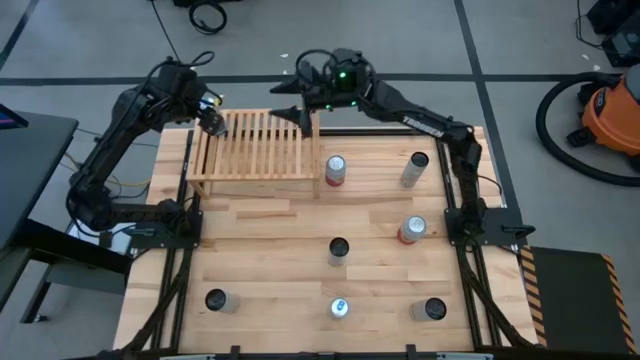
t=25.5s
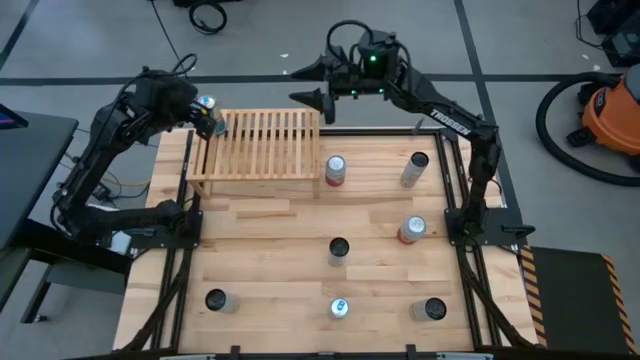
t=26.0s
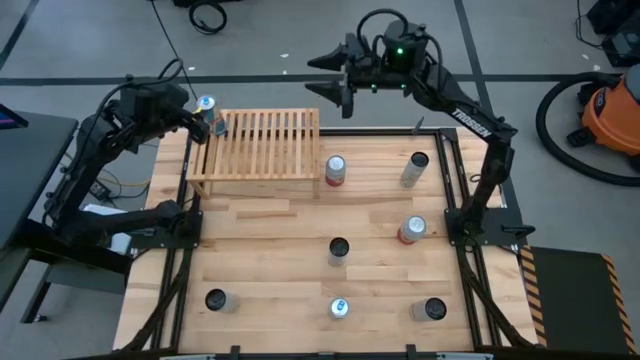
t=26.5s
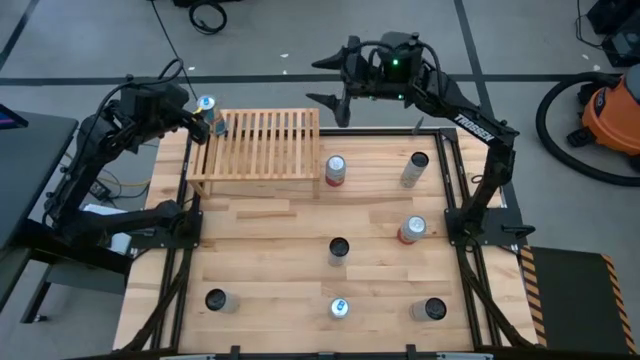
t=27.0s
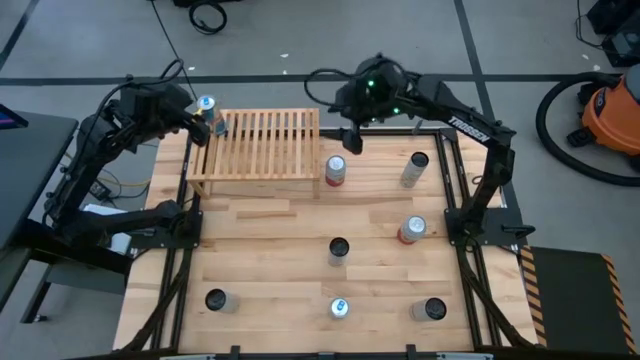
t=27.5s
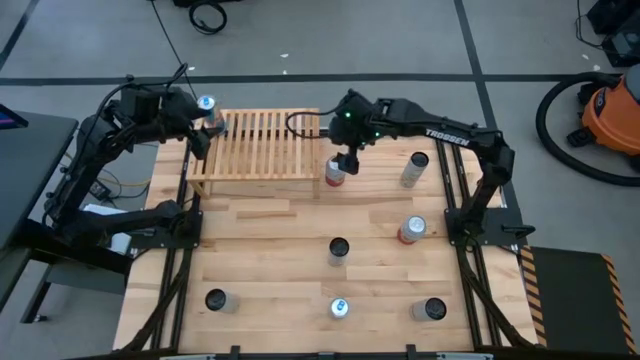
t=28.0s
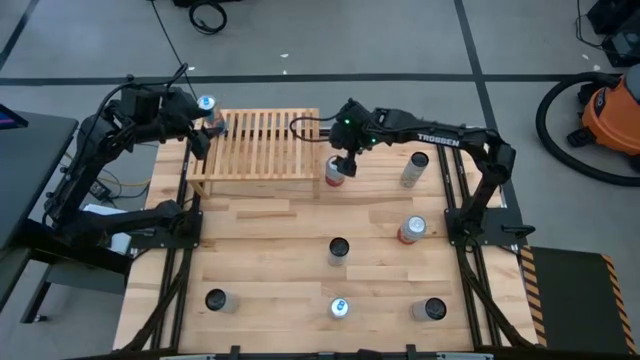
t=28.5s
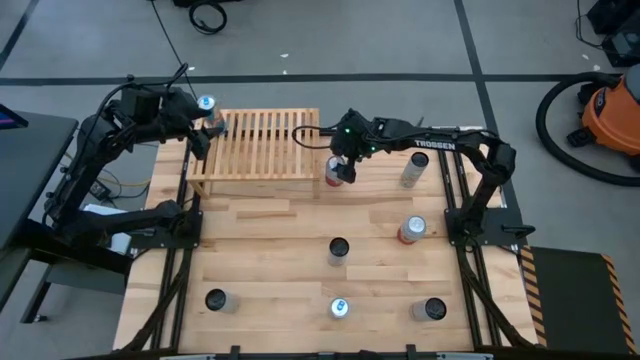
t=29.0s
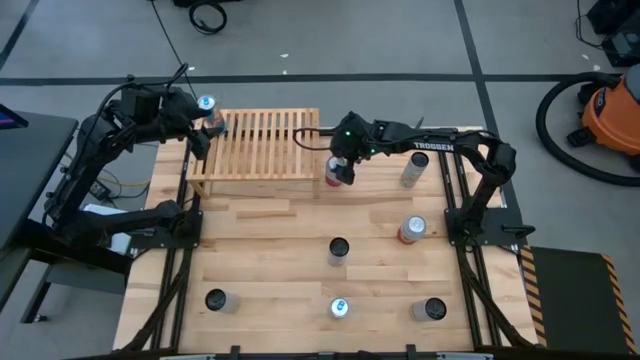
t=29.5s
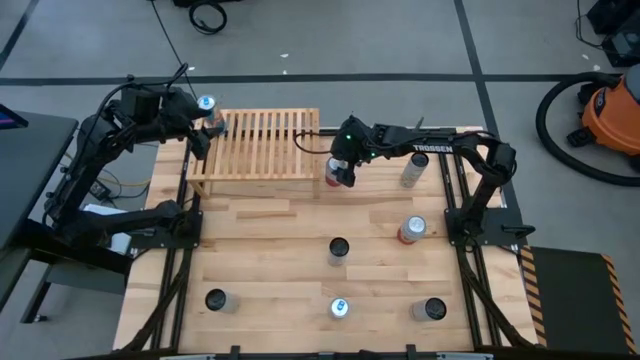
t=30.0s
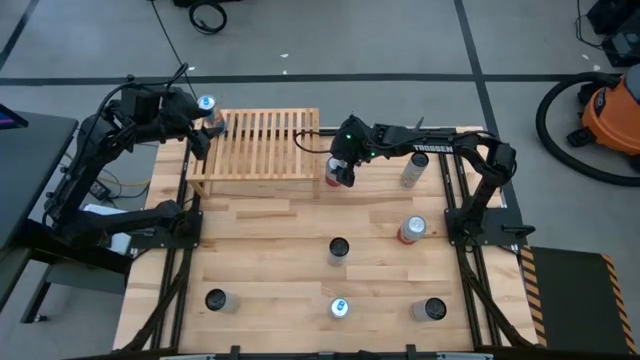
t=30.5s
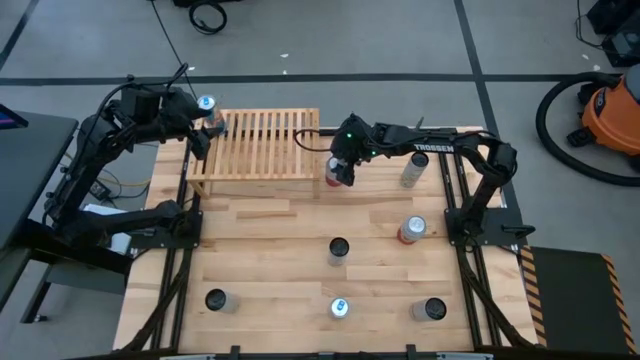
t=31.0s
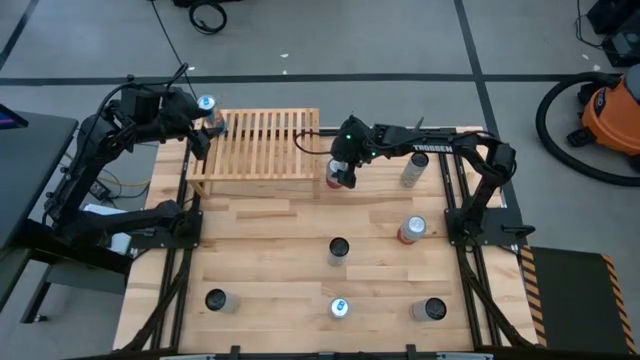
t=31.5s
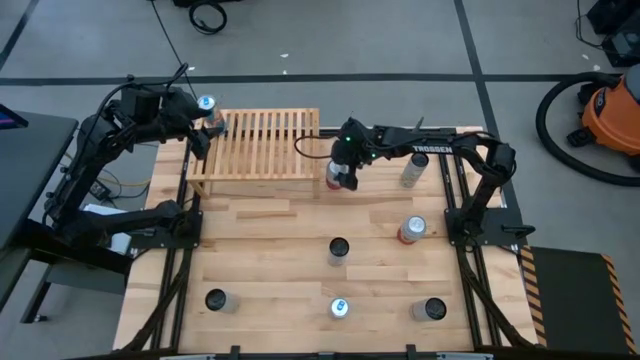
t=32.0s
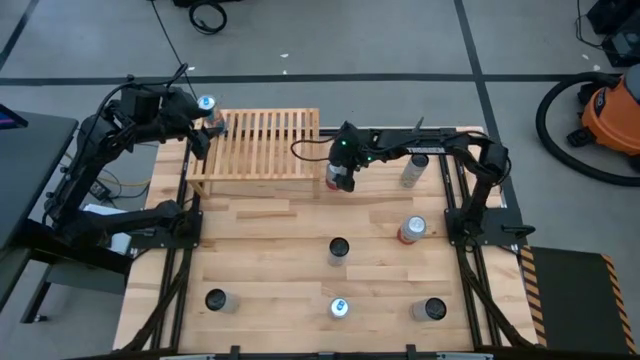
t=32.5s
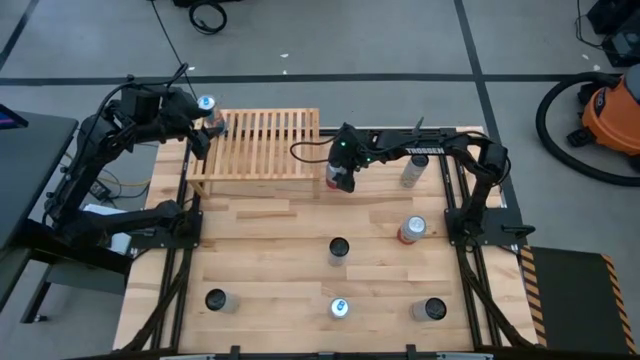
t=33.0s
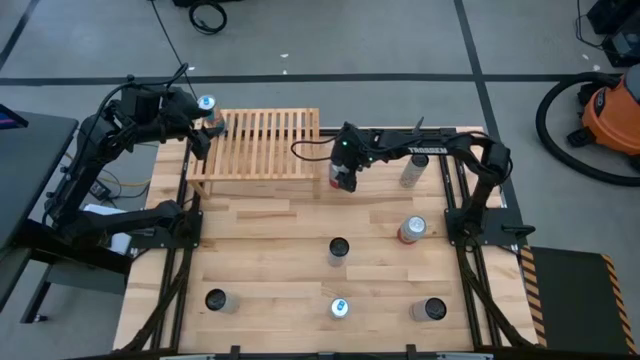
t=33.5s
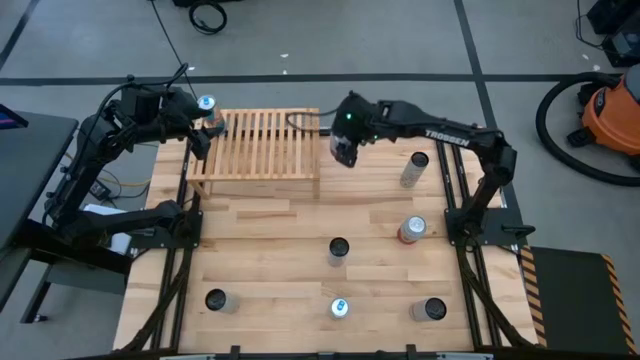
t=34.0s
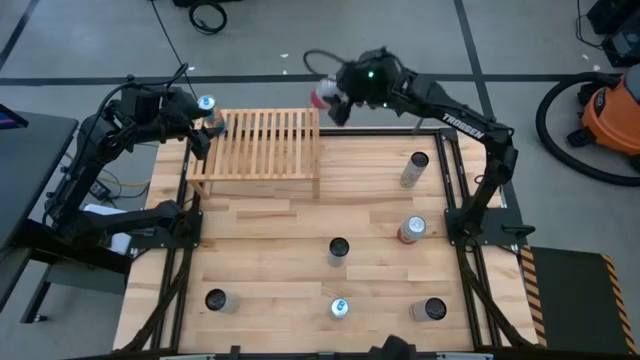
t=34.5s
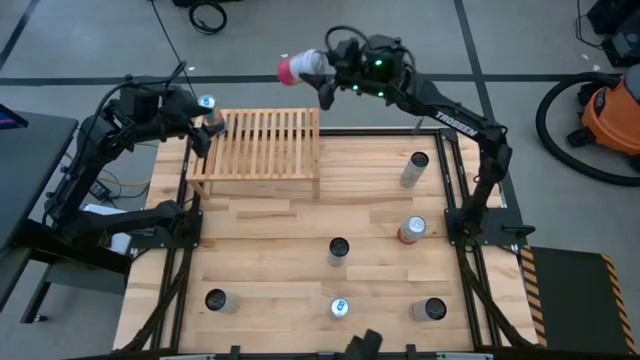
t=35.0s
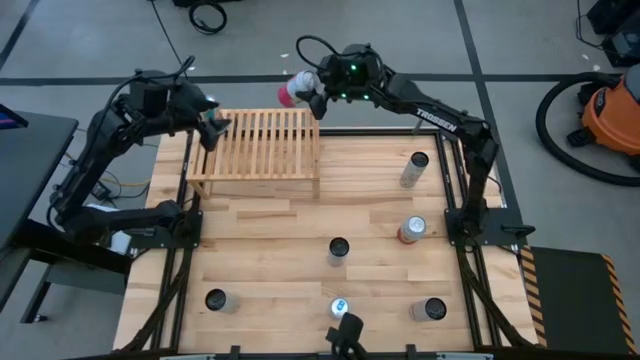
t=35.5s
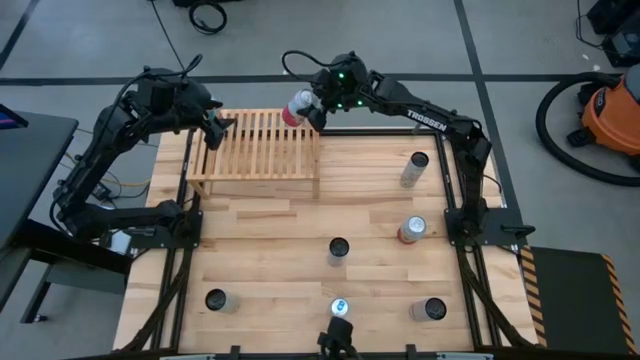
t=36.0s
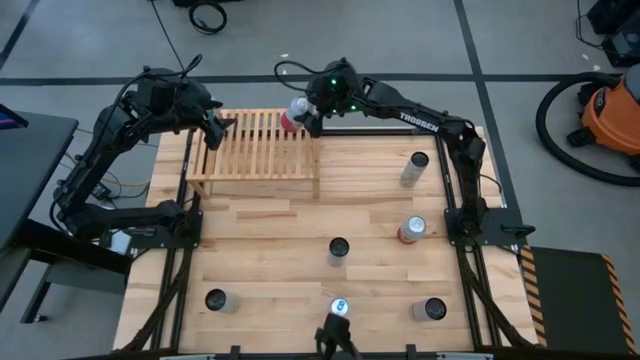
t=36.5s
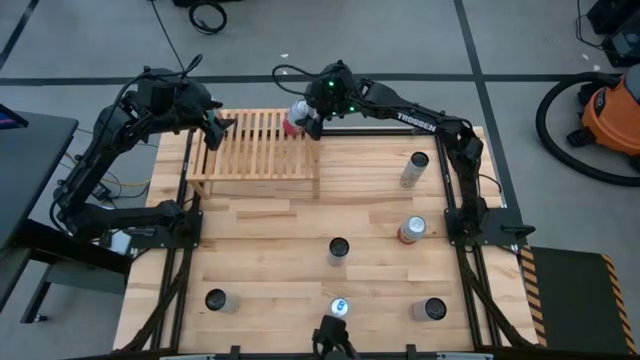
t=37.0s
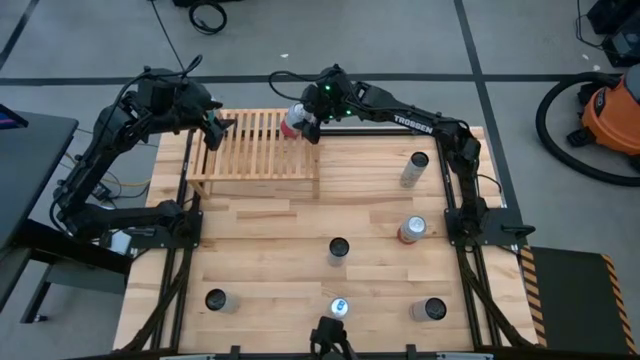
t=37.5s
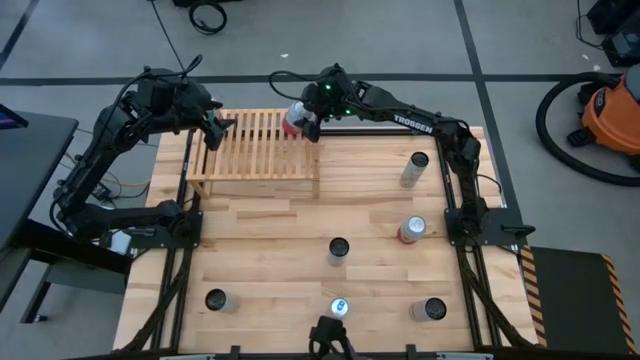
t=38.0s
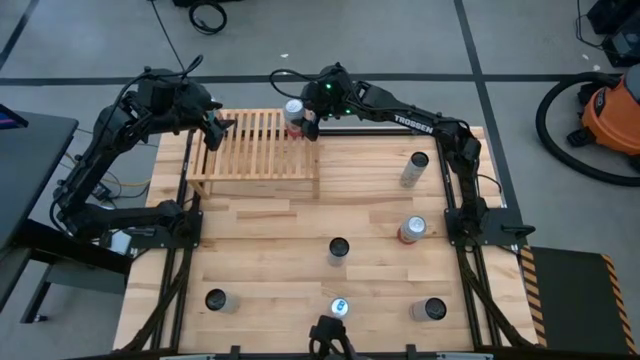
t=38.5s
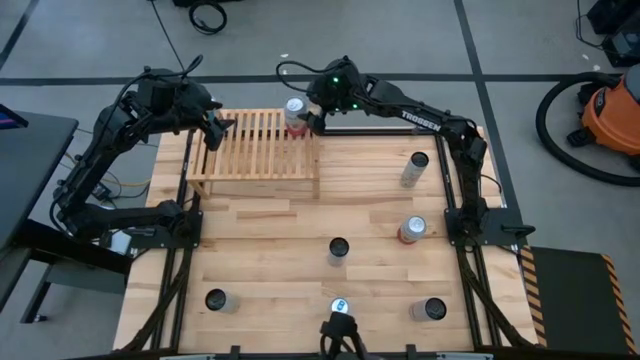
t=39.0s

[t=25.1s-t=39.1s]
Task: Place canned beverage on shelf
Put the left pink and white soda can on the shelf aligned with the blue soda can

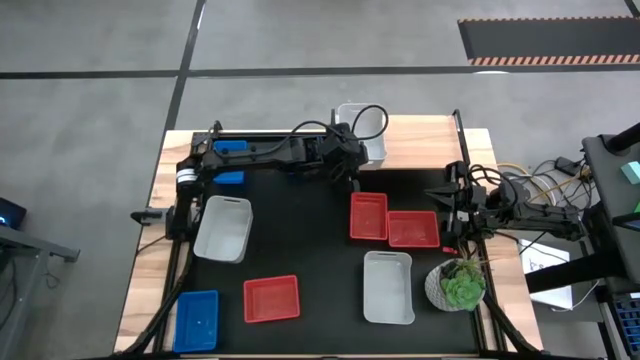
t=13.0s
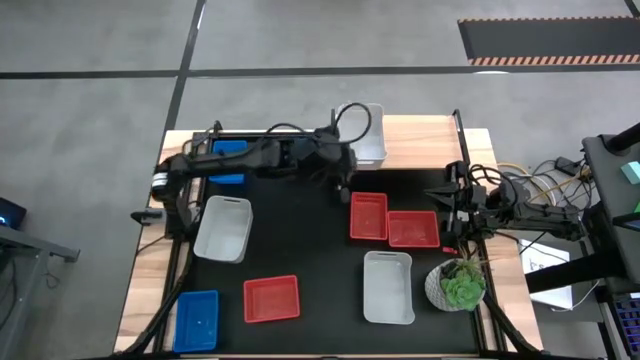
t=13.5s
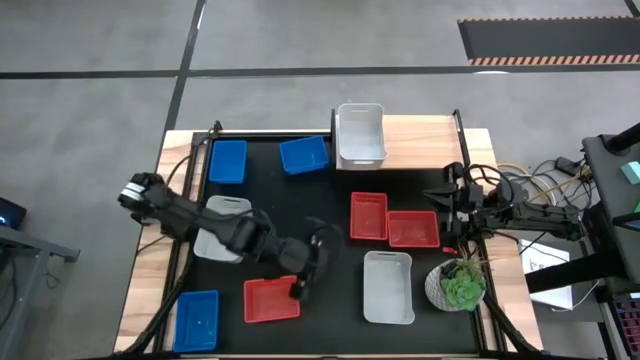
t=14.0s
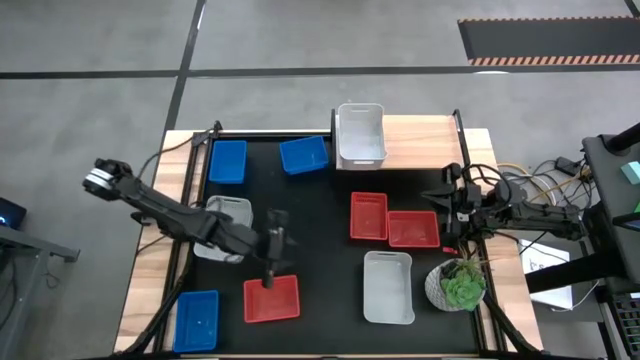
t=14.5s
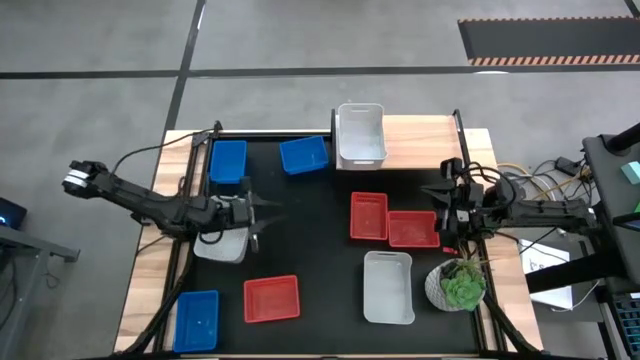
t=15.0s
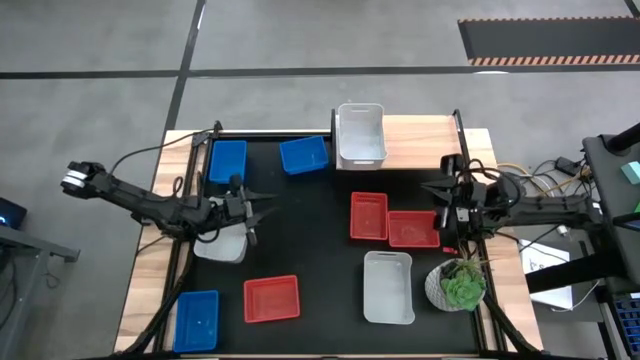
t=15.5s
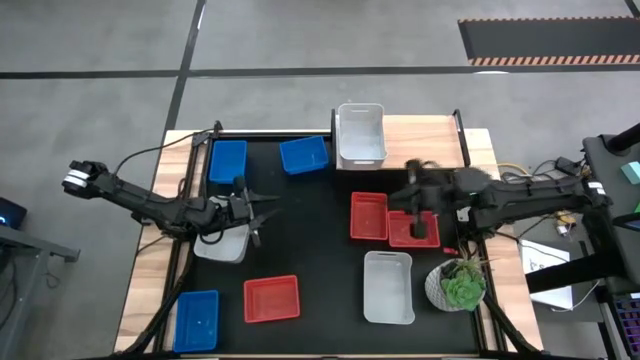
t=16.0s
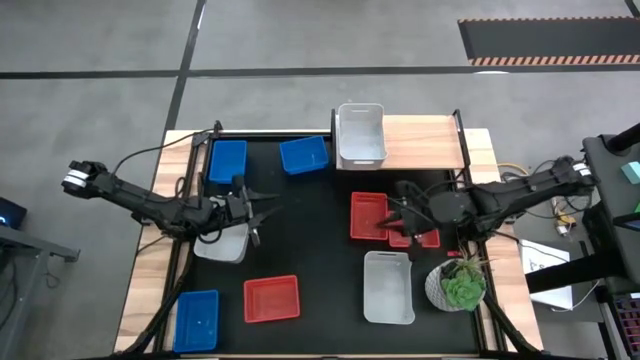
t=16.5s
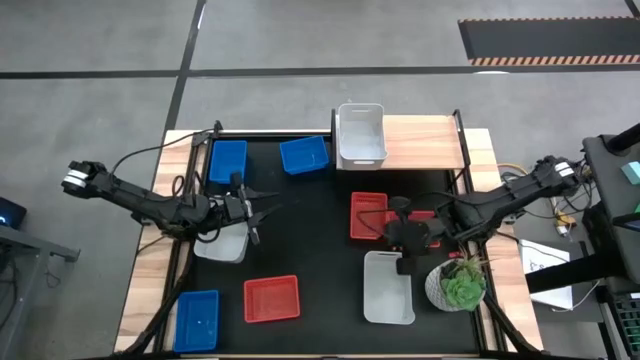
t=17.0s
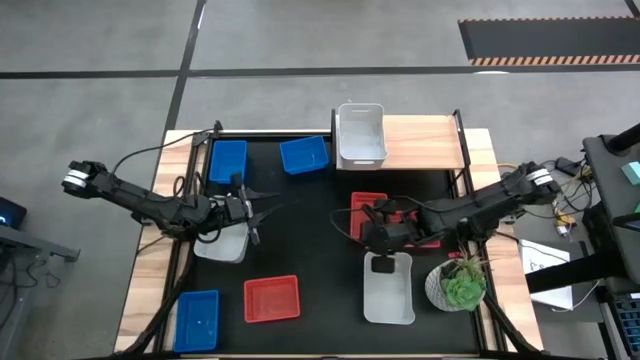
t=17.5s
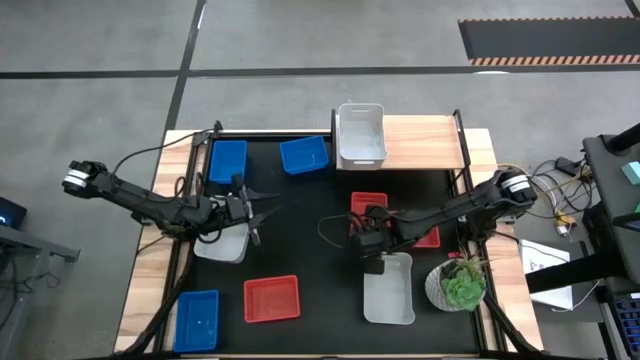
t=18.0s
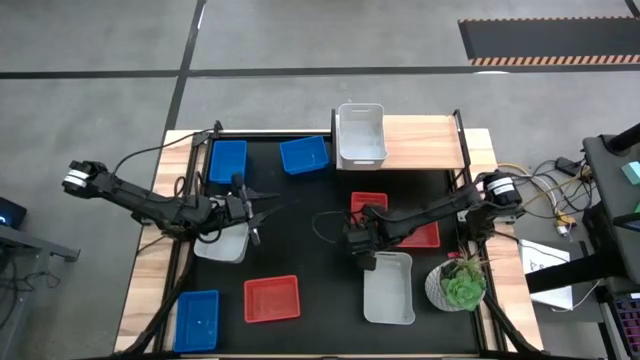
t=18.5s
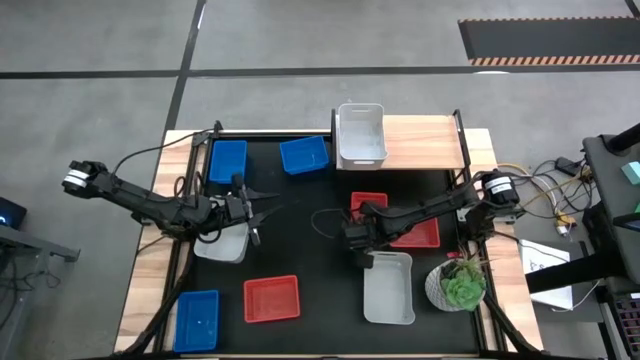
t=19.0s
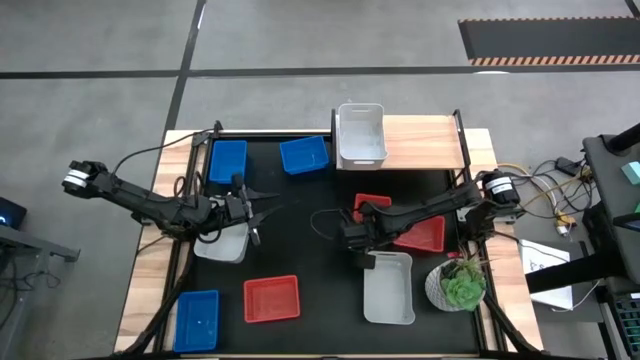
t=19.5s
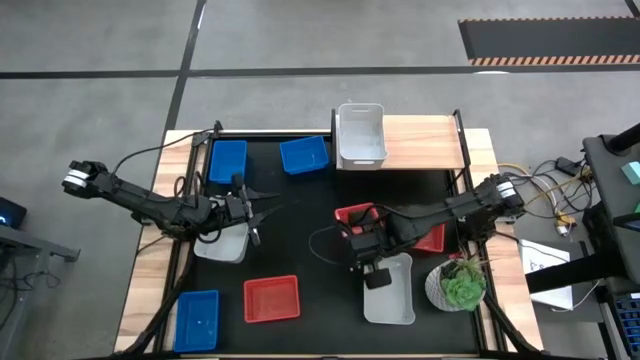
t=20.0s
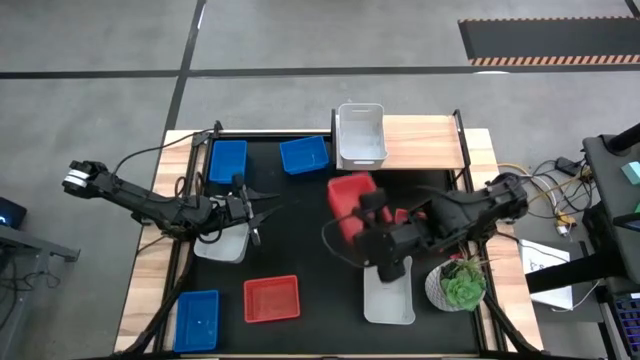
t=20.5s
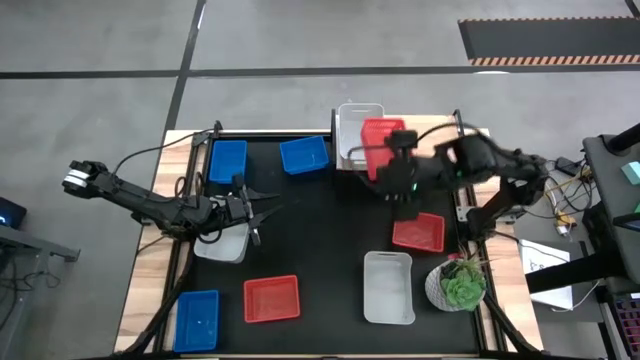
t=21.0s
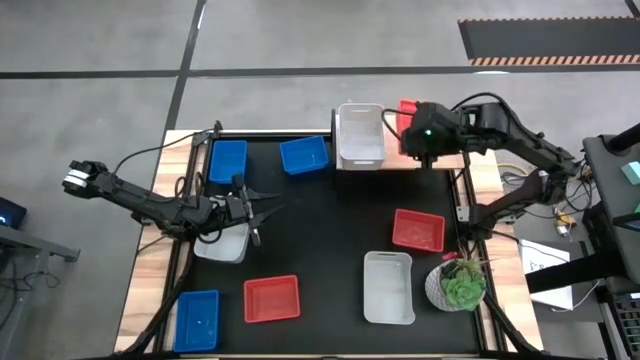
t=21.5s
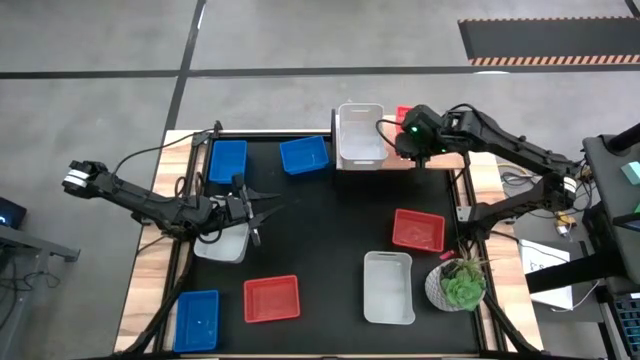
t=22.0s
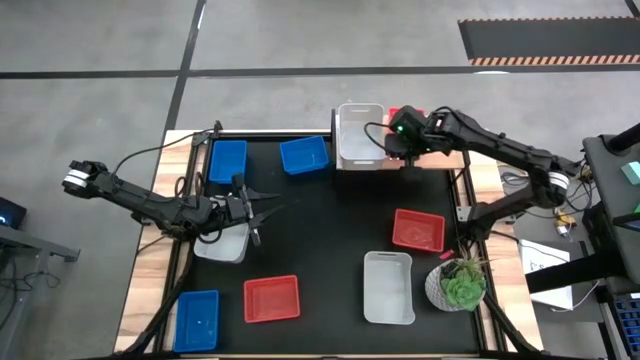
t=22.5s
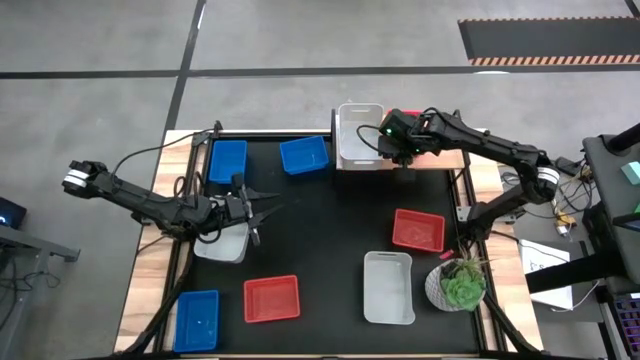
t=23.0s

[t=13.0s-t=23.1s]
Task: Stack baskets on shelf by color
Put the top left red bin on the shelf
